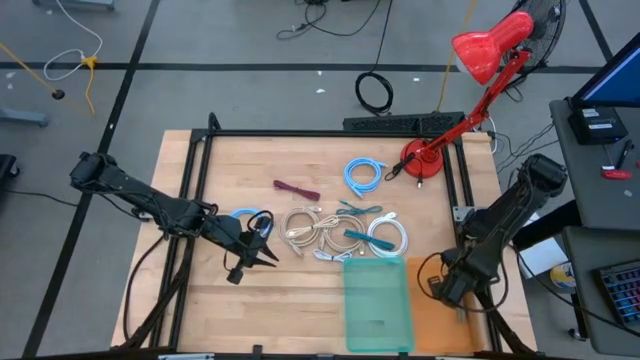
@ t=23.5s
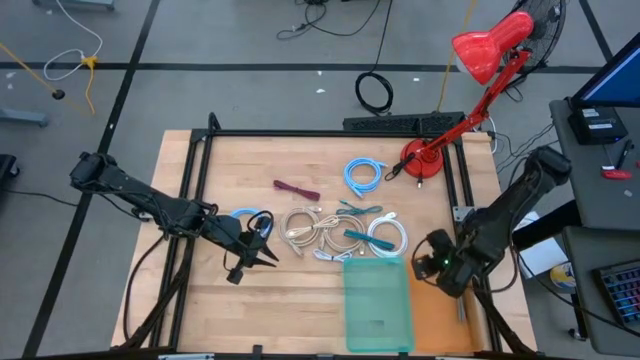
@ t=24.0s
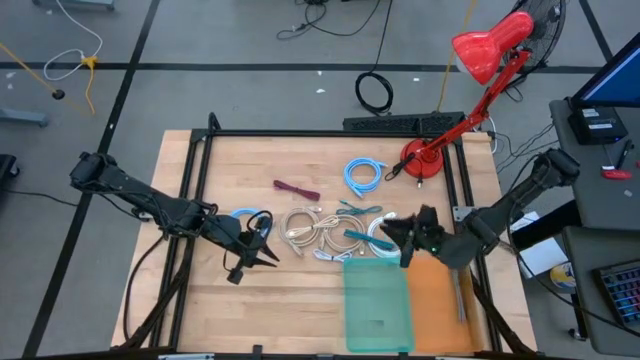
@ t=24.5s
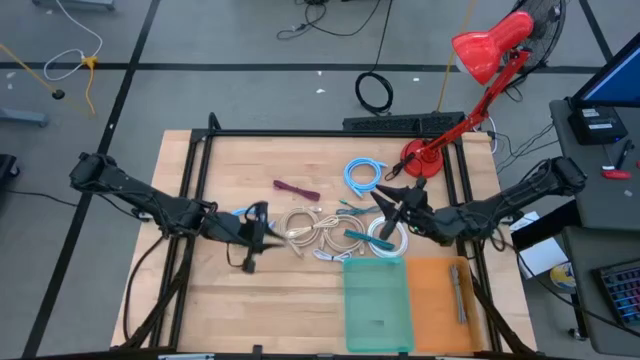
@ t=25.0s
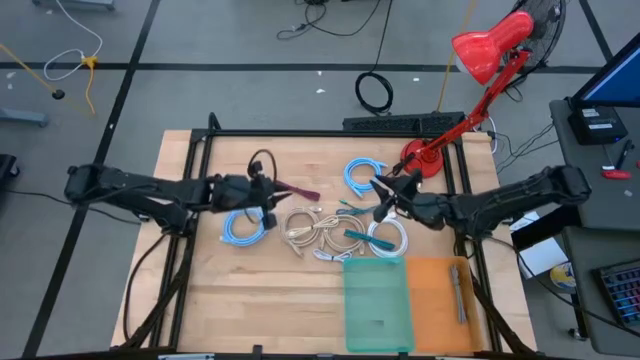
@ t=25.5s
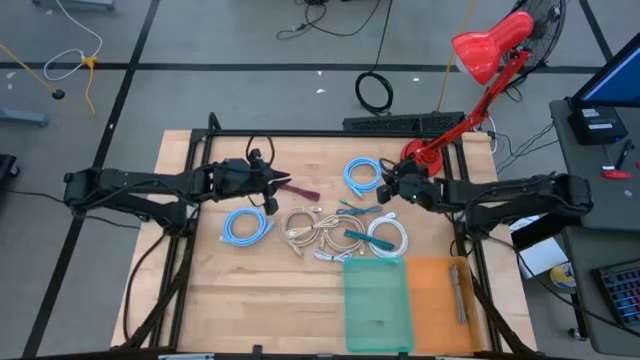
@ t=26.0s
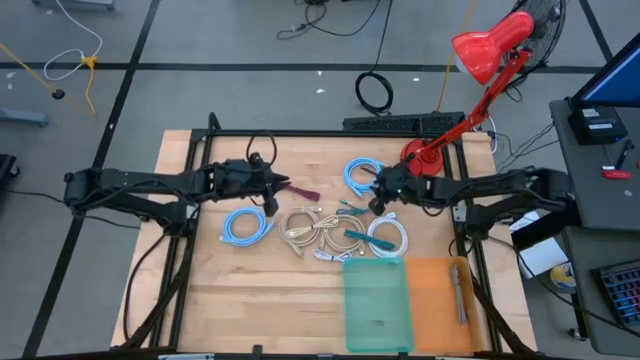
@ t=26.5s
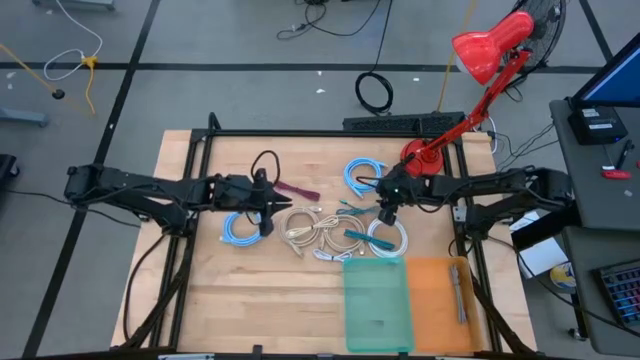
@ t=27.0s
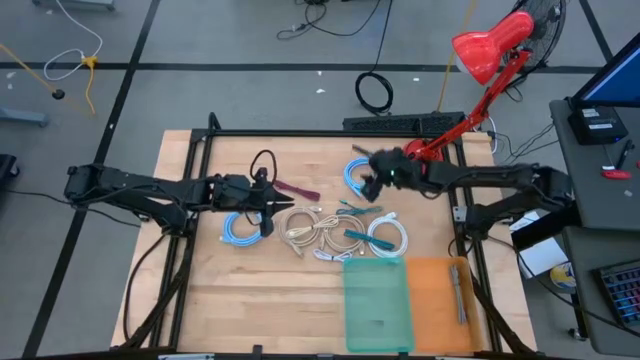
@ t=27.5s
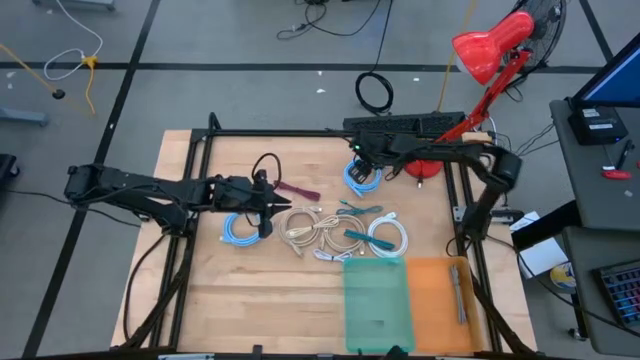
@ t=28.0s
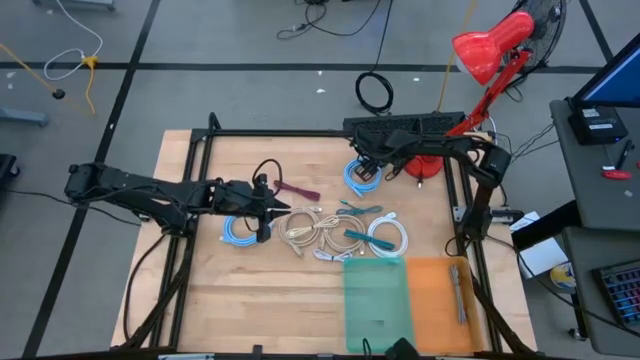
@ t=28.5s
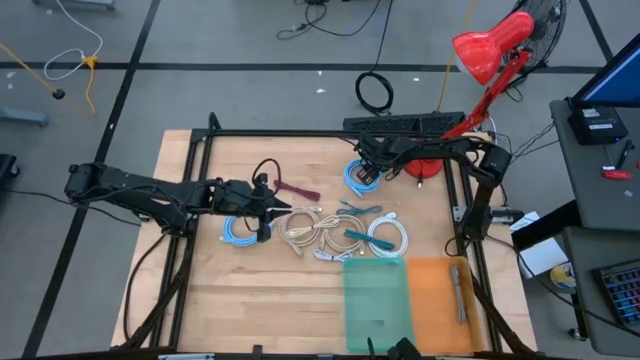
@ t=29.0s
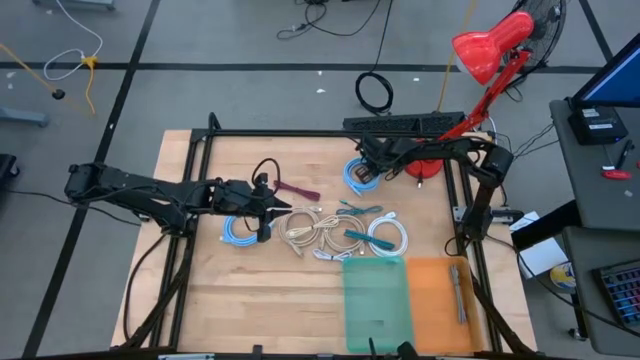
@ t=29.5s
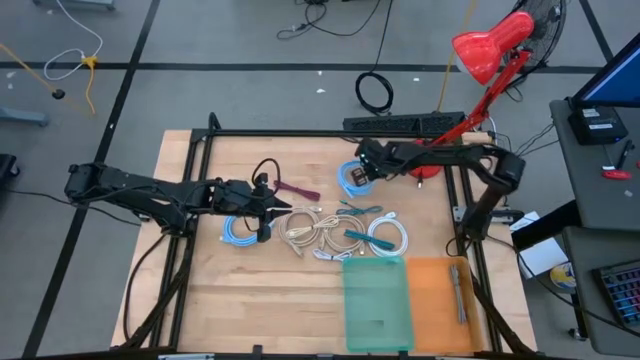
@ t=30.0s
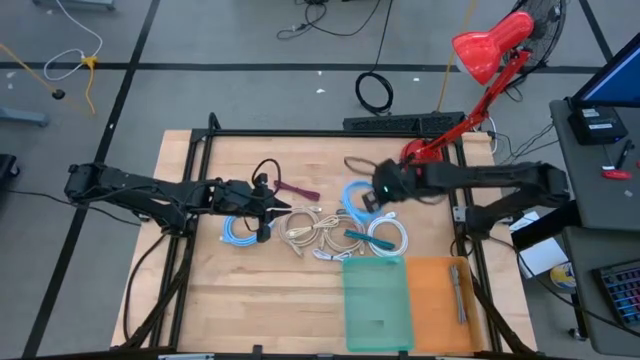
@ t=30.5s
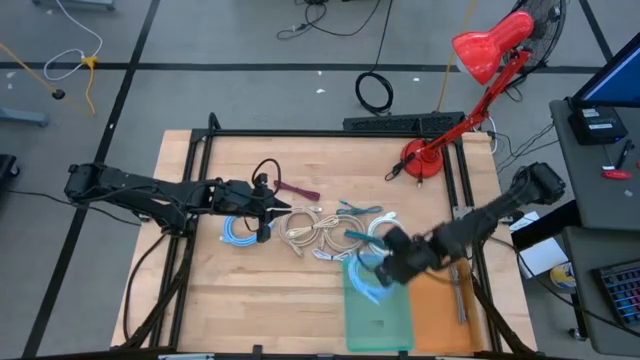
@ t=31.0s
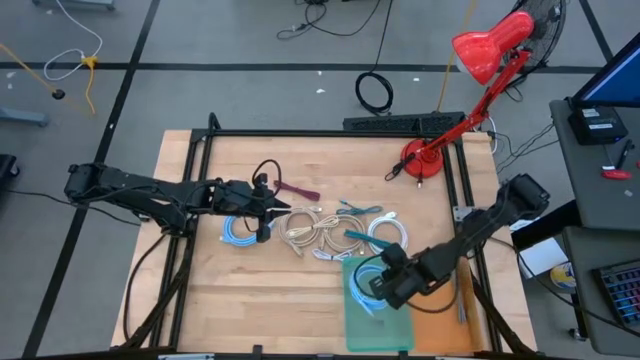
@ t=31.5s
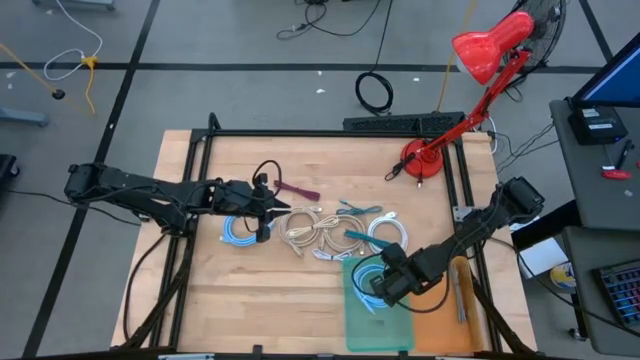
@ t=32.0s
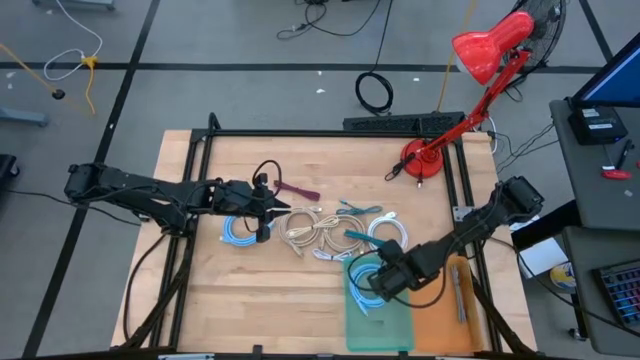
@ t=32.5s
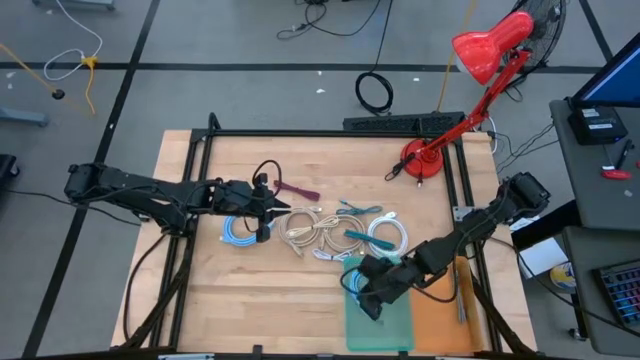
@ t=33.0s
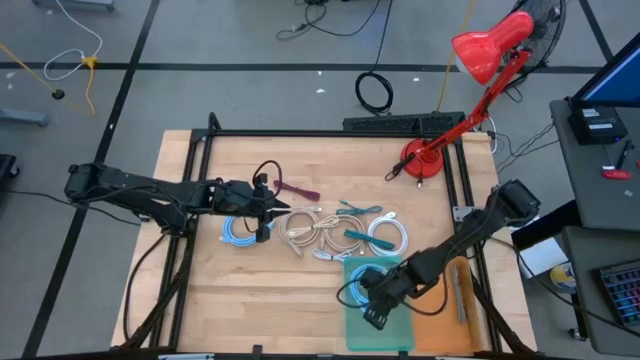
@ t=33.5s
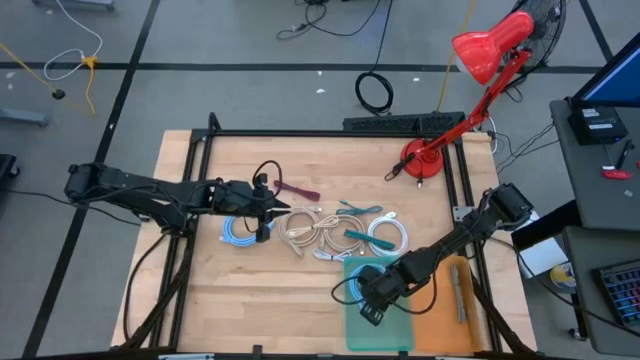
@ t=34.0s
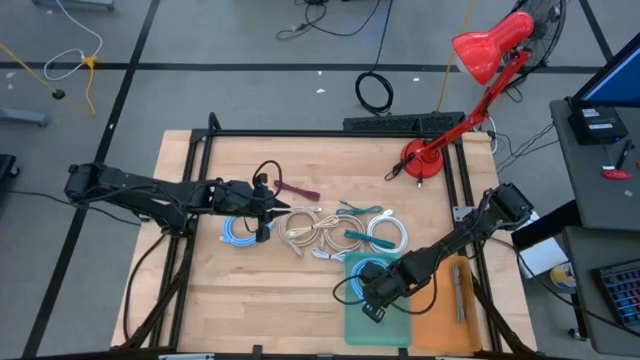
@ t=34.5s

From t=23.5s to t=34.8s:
Task: Pick & Place USB Port
Put the light blue charger cable into the blue bin

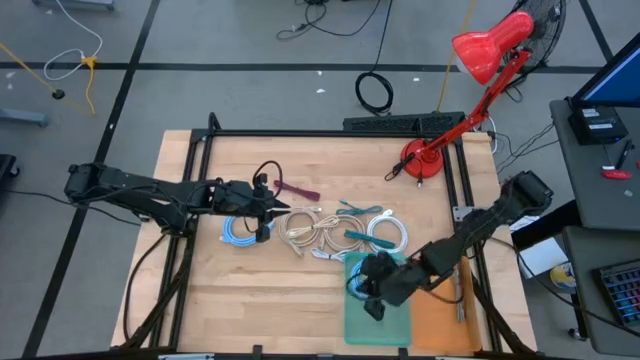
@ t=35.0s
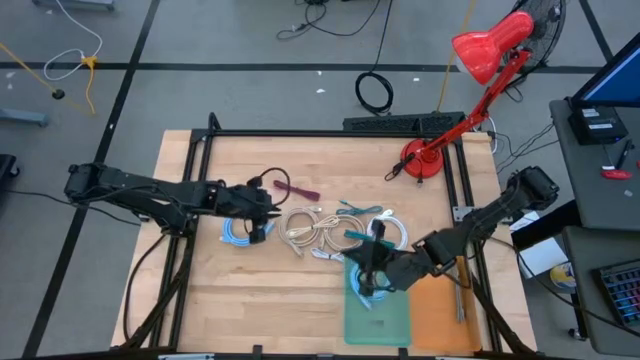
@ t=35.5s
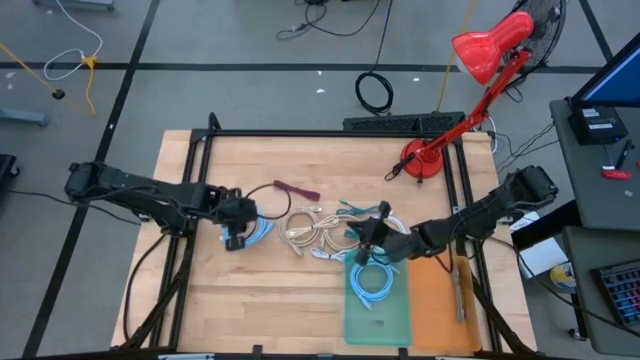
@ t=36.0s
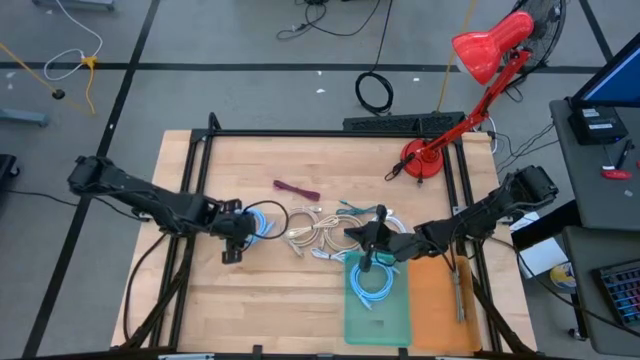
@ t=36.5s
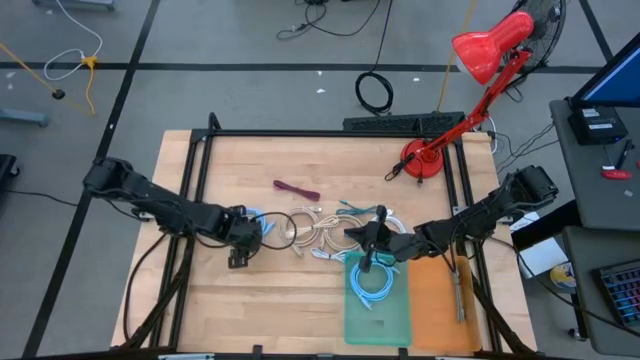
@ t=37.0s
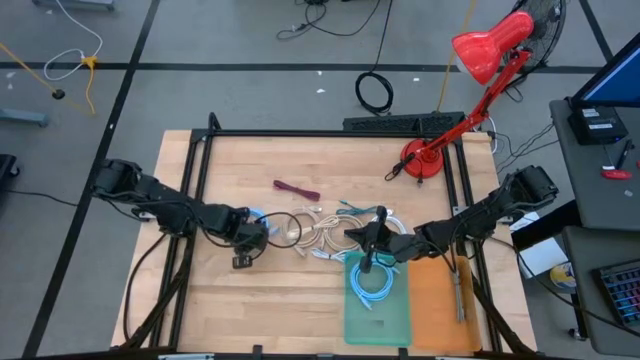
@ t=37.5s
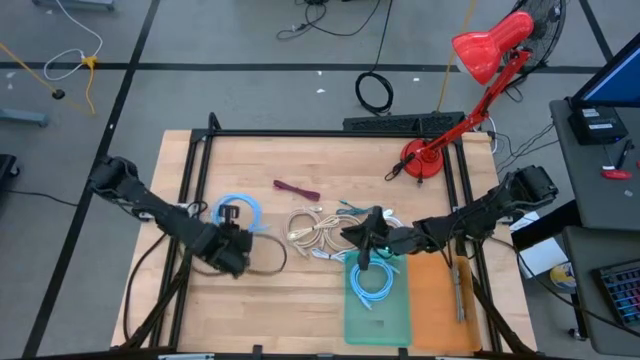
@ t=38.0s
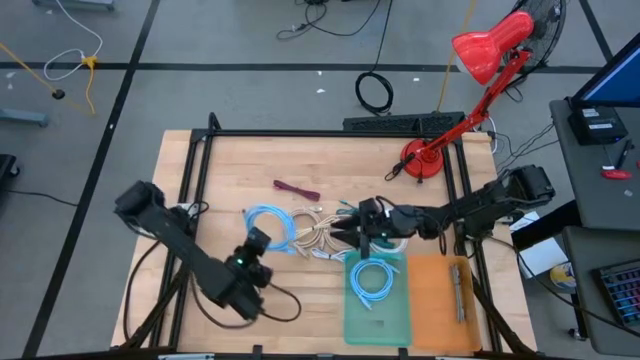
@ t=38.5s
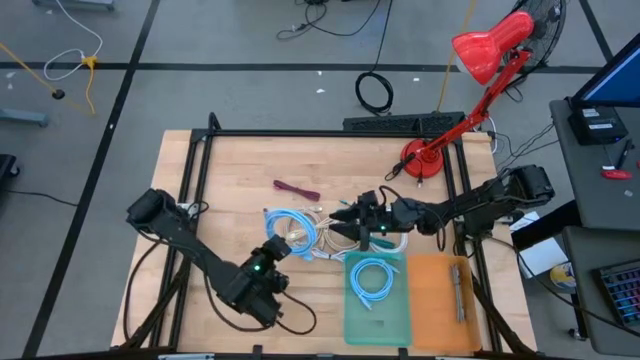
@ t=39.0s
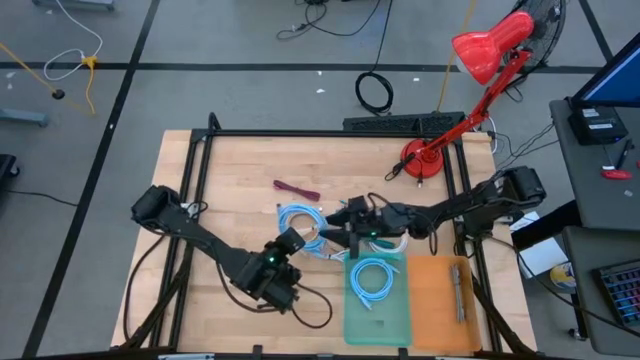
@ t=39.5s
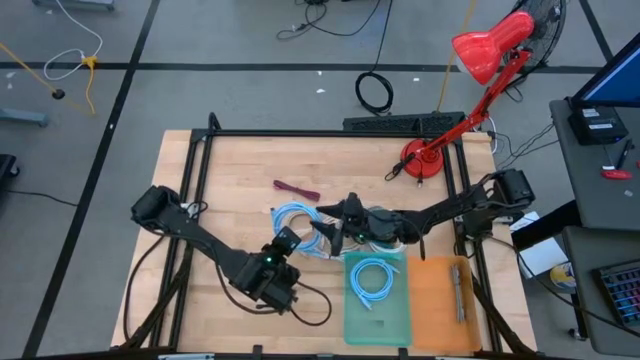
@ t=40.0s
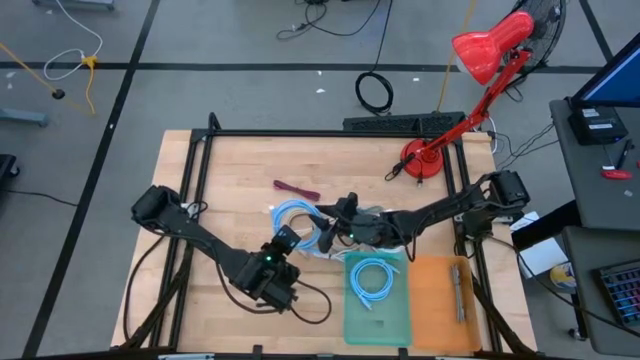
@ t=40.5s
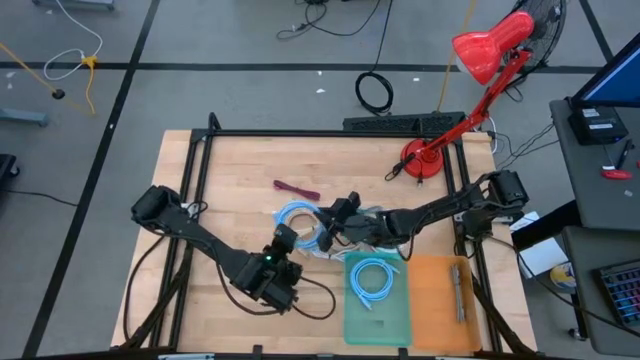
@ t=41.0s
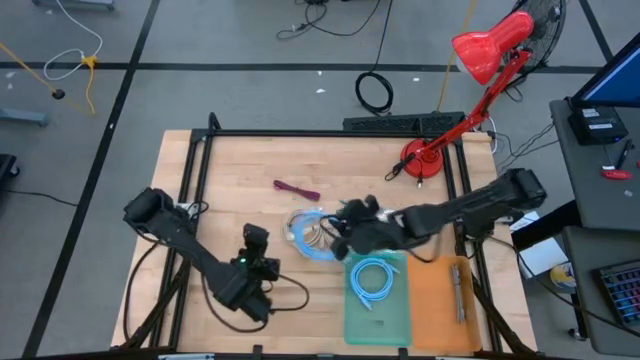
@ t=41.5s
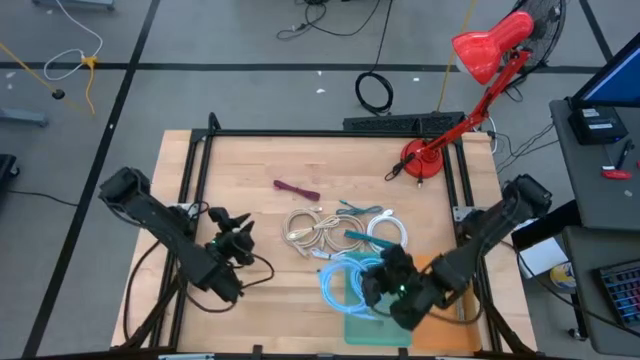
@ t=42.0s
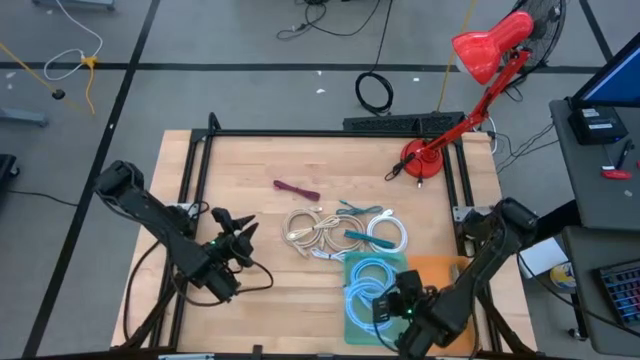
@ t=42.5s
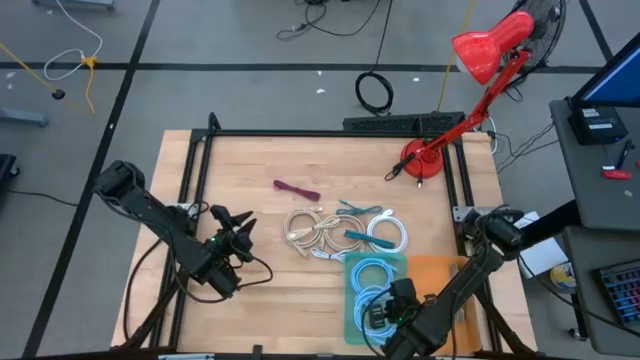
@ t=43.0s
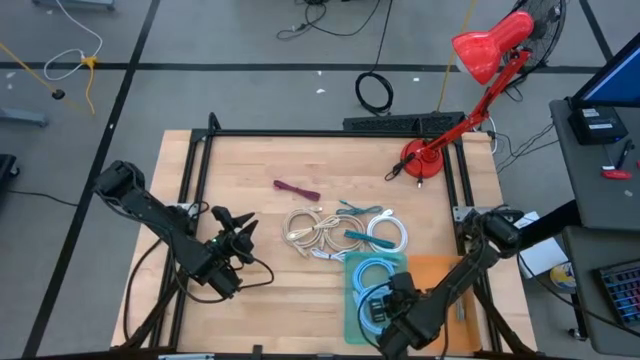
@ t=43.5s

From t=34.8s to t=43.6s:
Put the light blue charger cable into the blue bin
